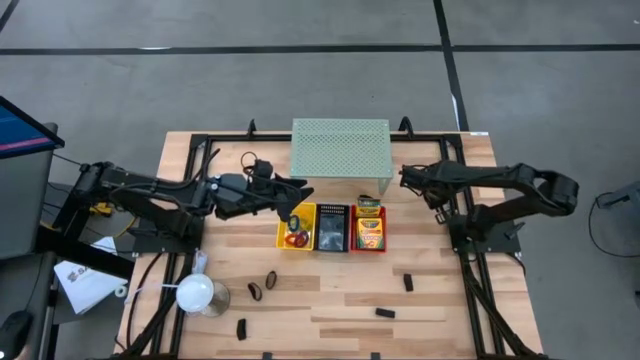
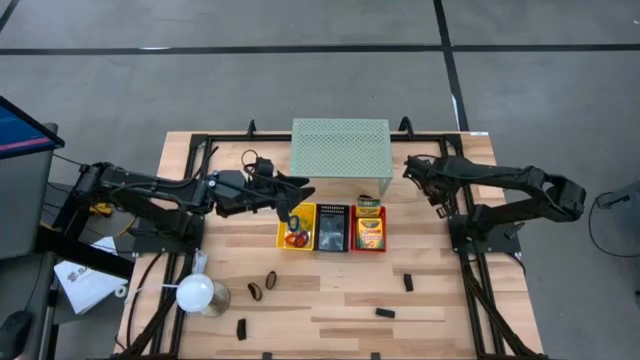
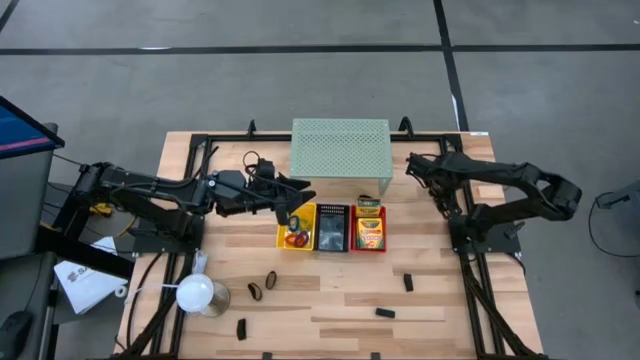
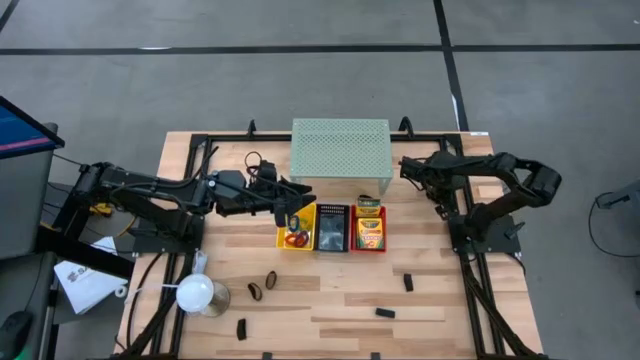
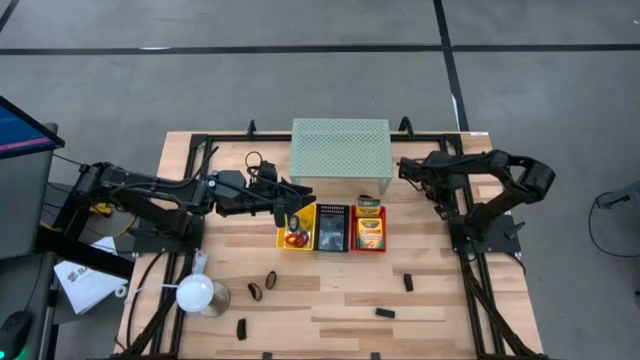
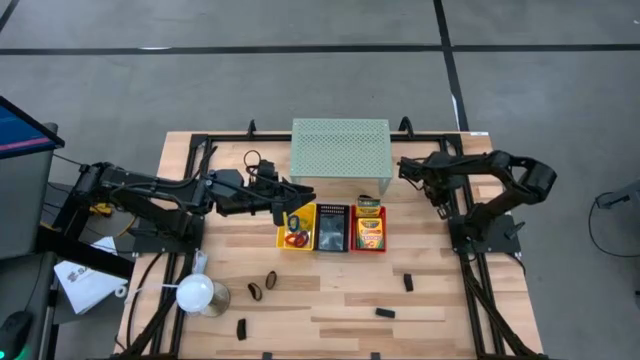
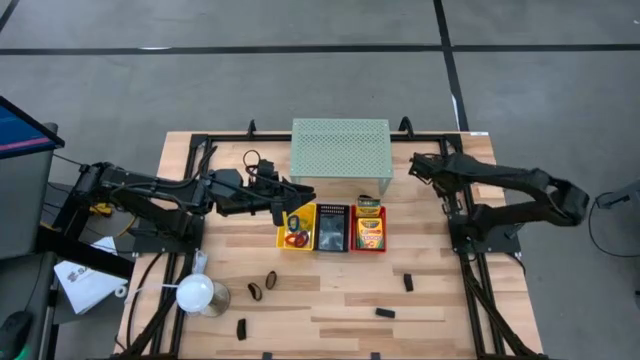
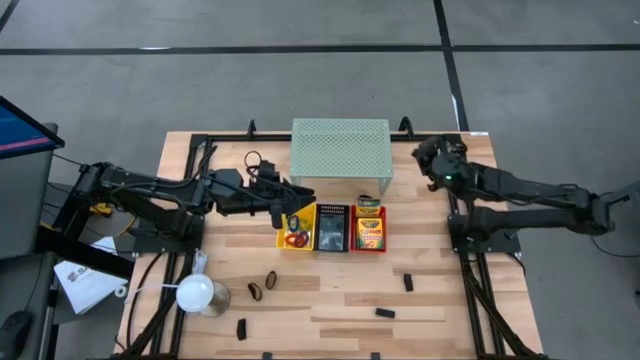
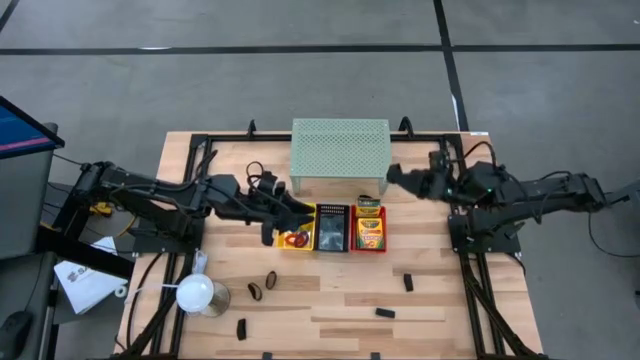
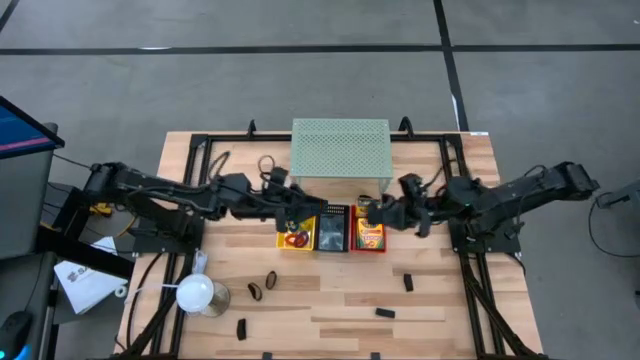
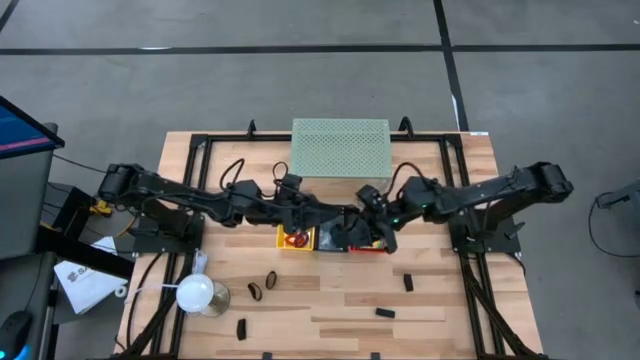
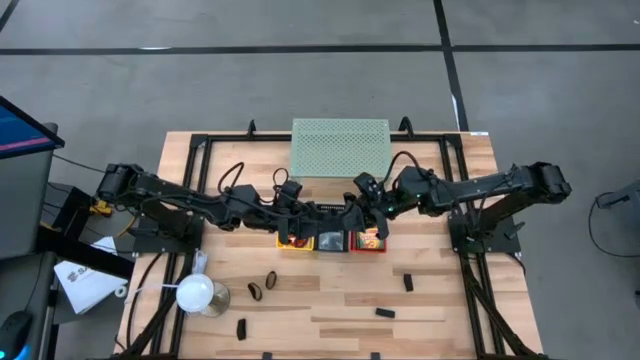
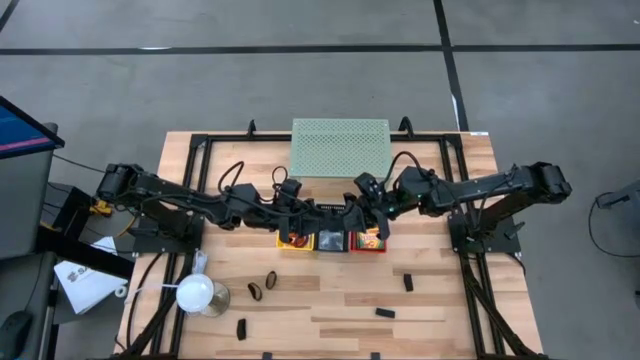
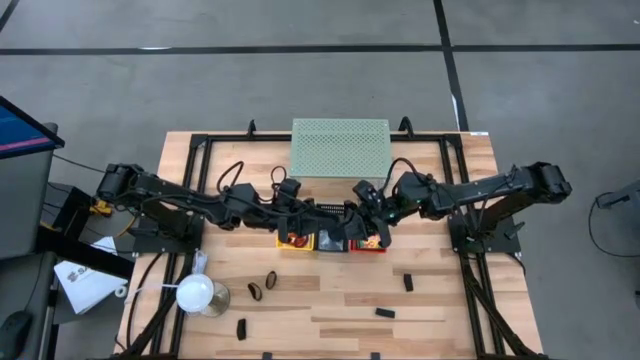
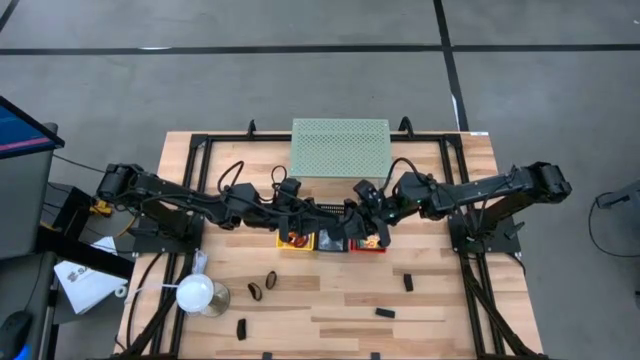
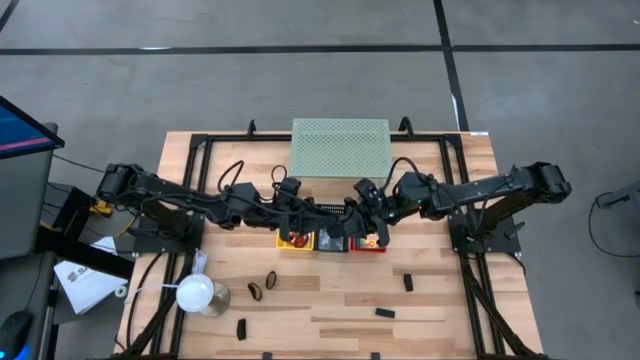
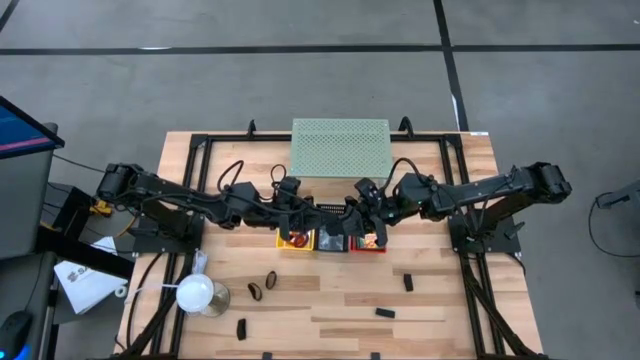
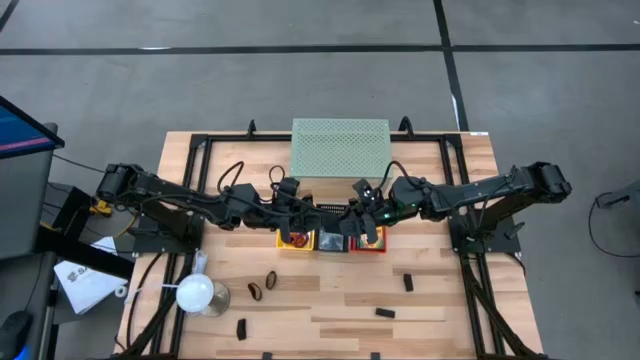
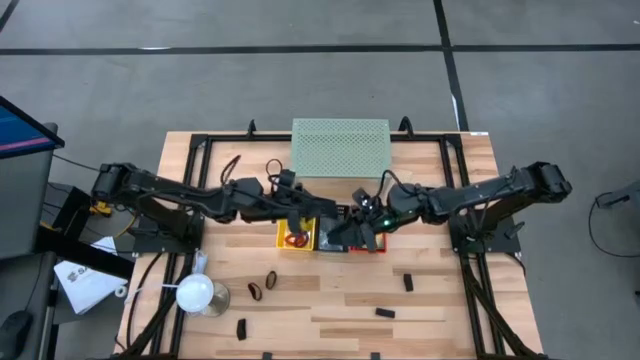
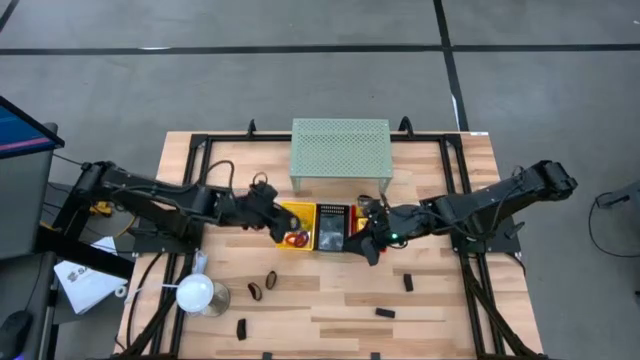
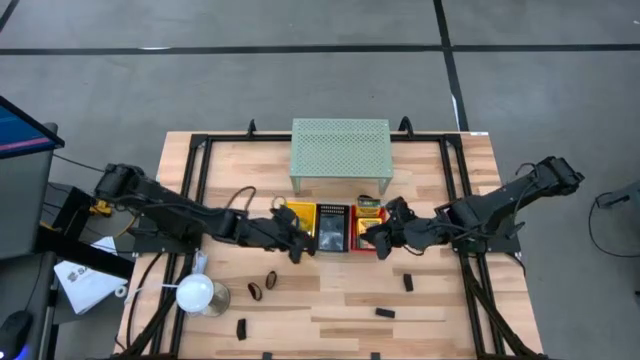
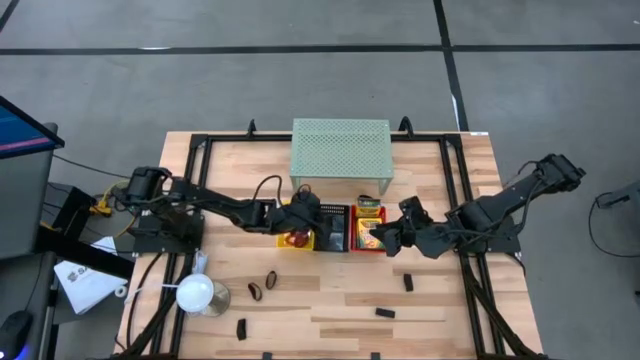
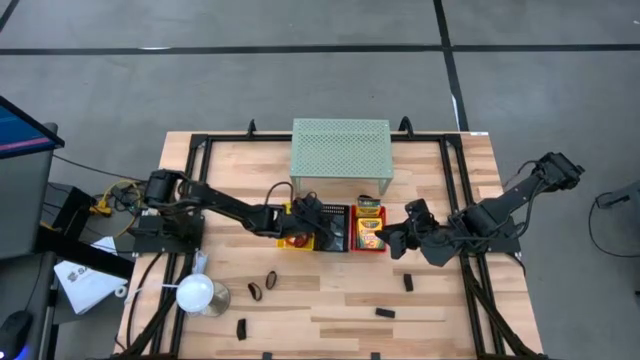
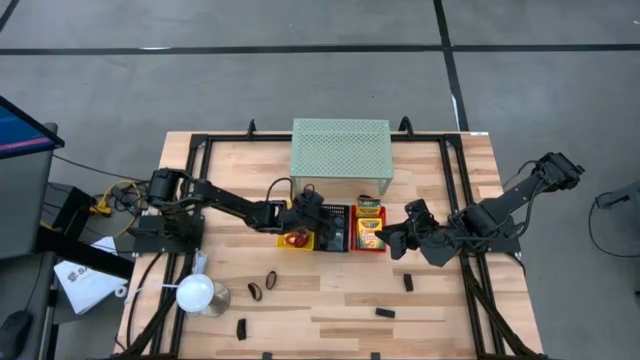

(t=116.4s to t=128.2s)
Task: Pick & Place Office Desk Supplies
Put the black rubber band into the black bin

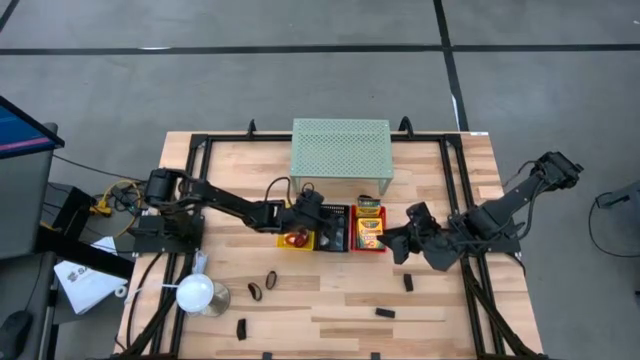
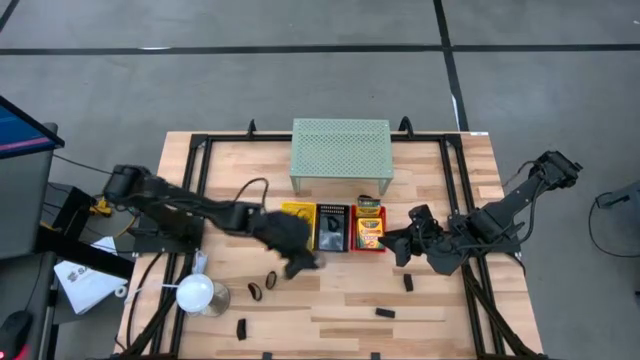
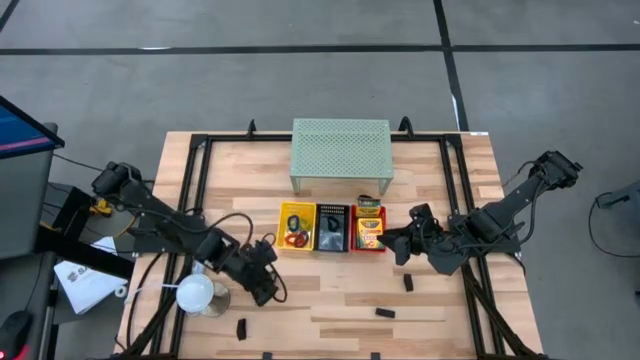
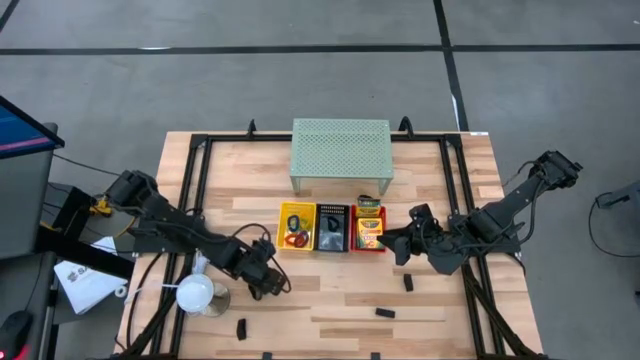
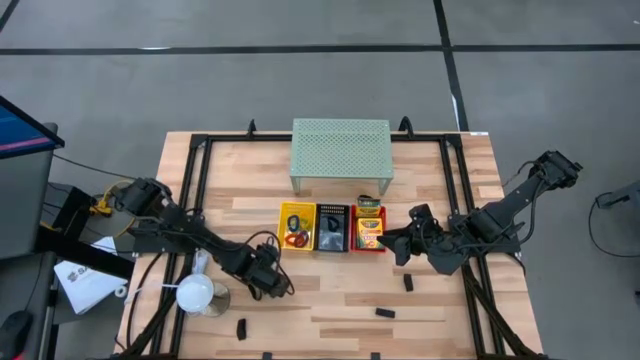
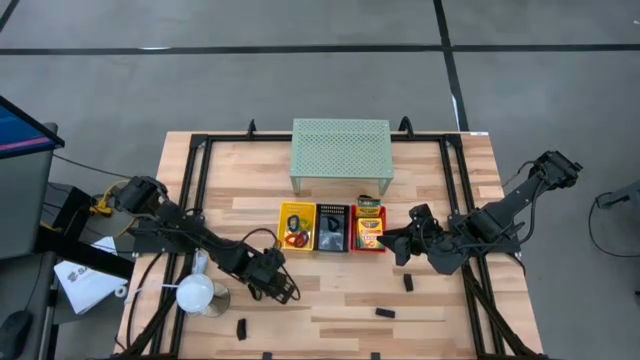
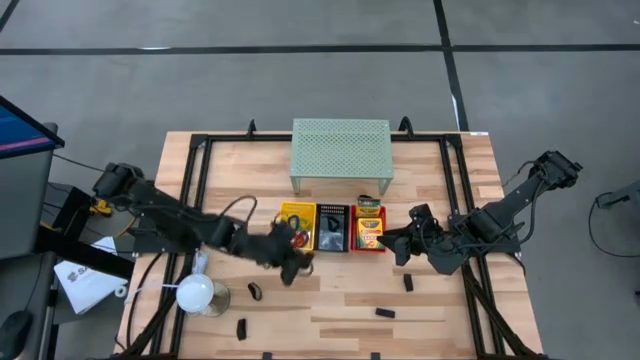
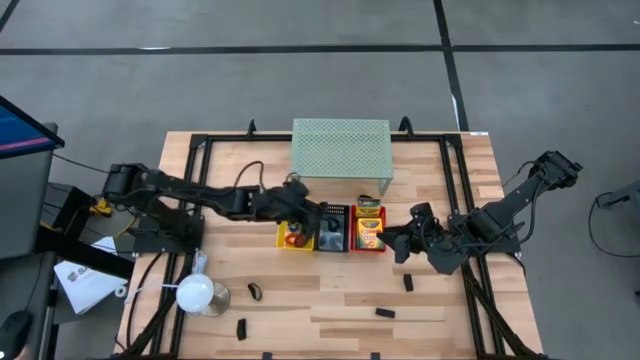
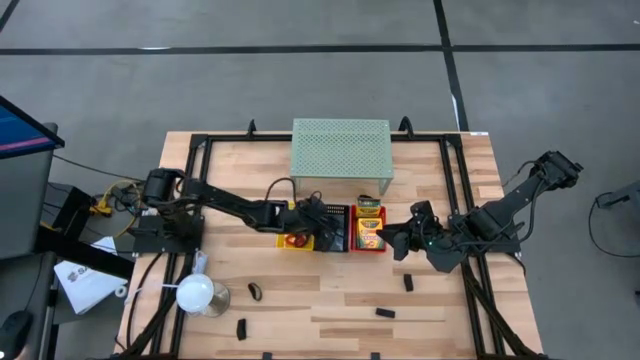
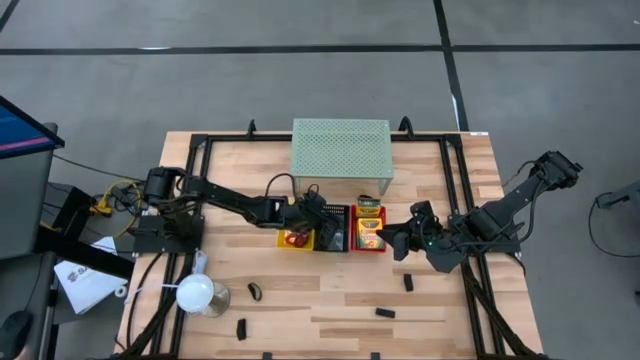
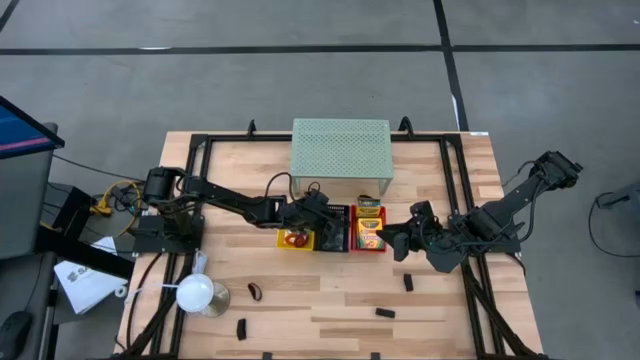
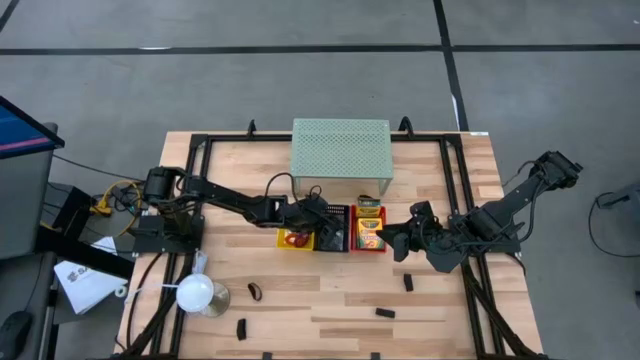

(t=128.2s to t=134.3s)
Put the black rubber band into the black bin

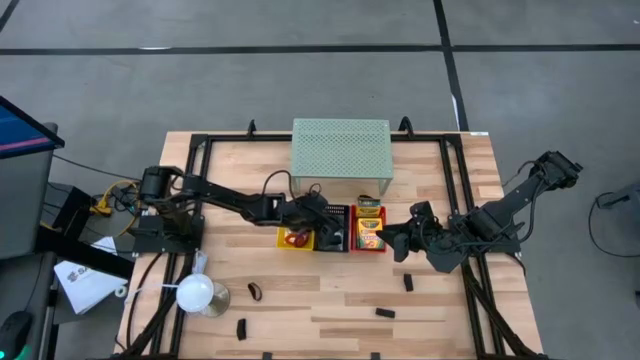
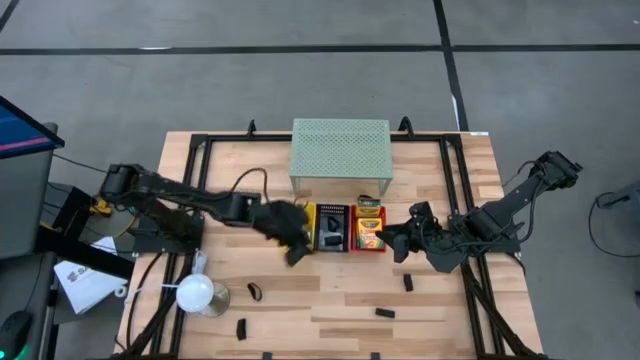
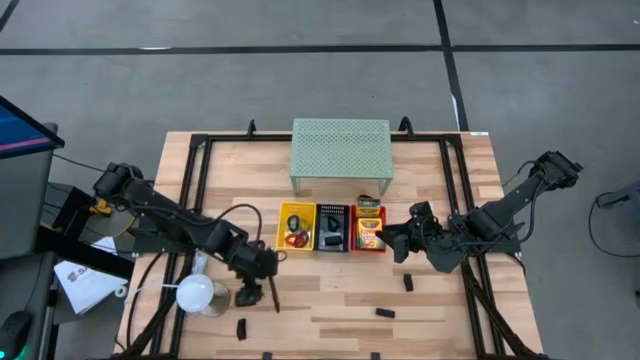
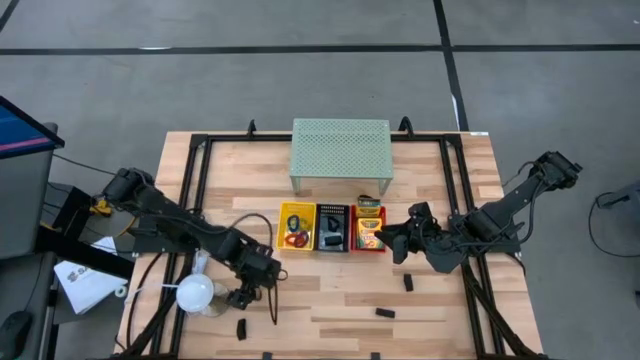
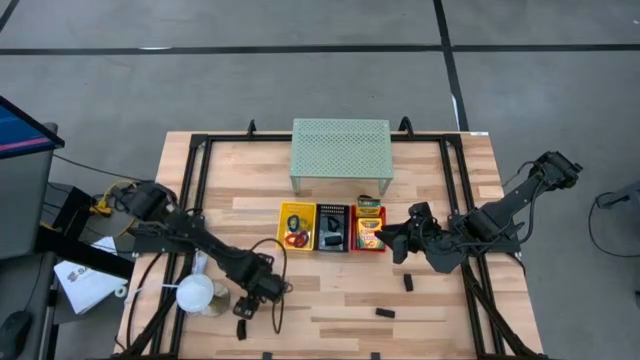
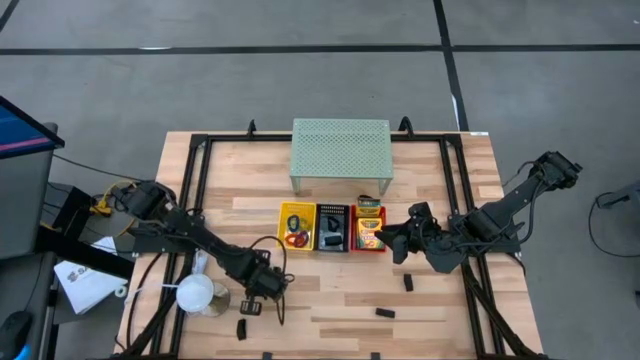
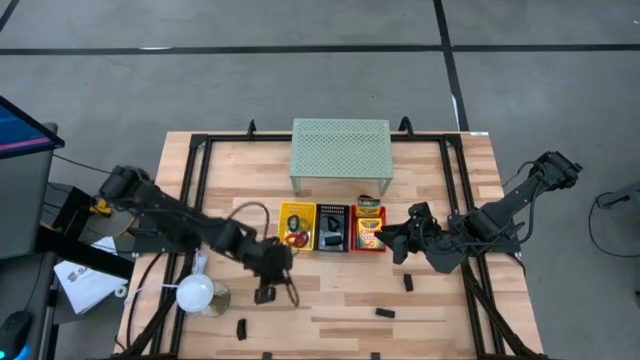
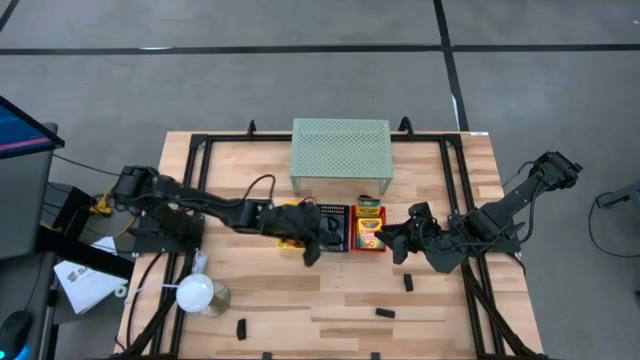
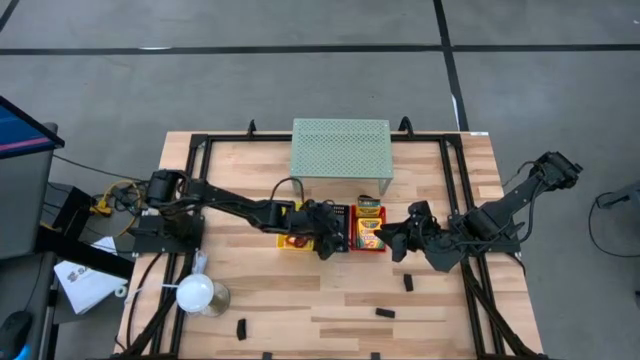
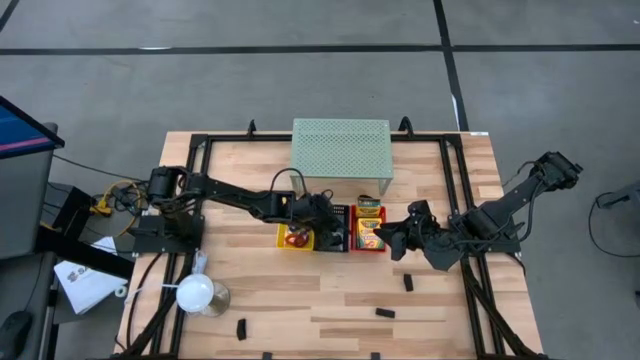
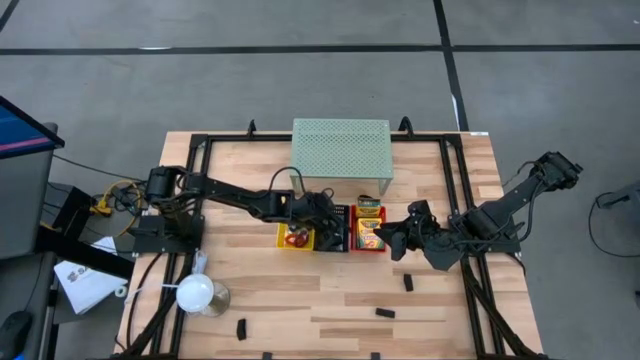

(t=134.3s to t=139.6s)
Put the black rubber band into the black bin
